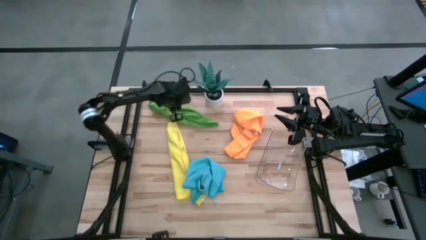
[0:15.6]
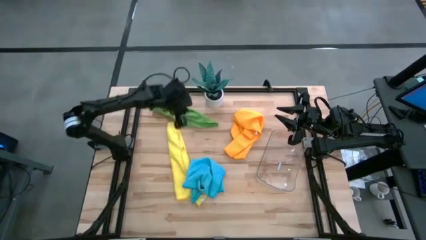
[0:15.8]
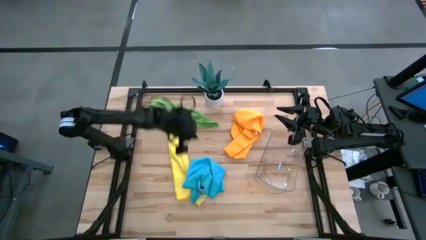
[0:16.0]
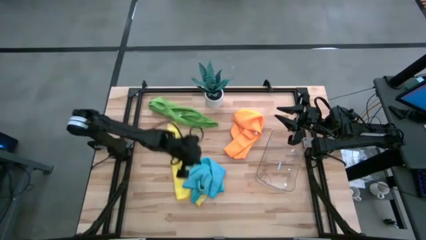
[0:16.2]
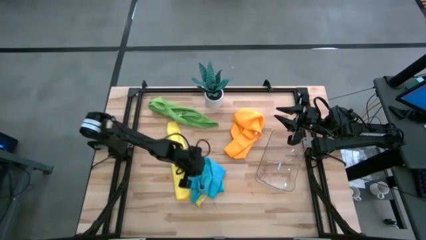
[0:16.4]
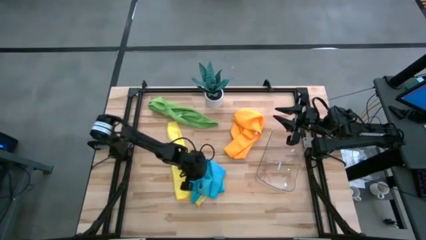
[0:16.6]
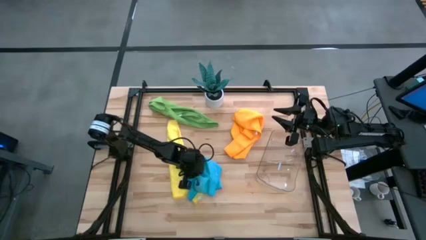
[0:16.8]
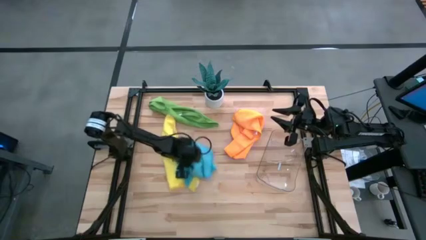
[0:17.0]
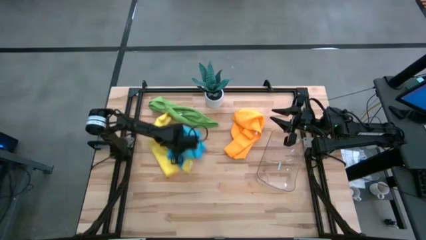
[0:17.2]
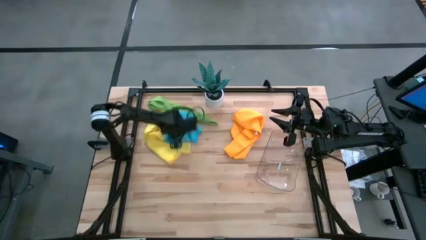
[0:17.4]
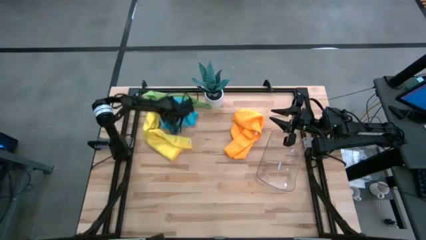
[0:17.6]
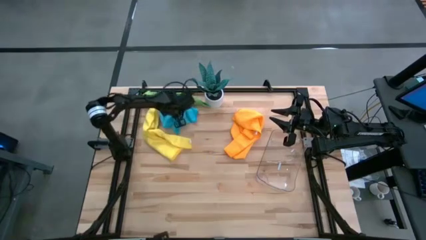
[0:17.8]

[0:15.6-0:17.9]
Task: Roll microfiber towels into tight, uniform cylinder then place into a basket
Move the blue microfiber cloth from center to top left

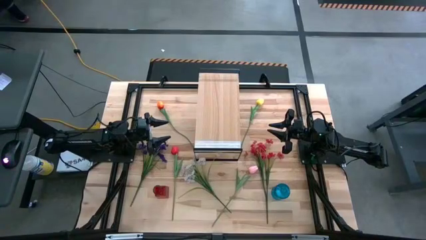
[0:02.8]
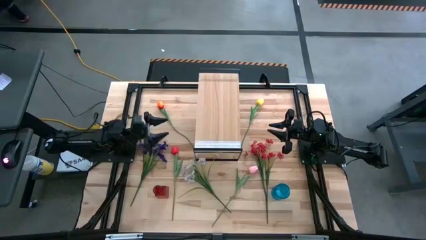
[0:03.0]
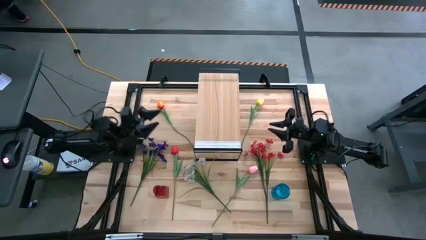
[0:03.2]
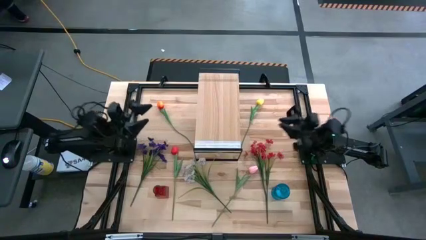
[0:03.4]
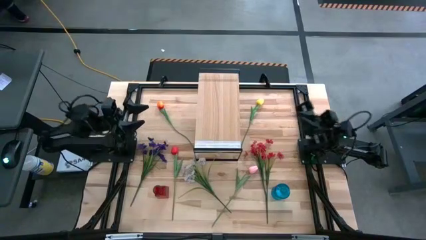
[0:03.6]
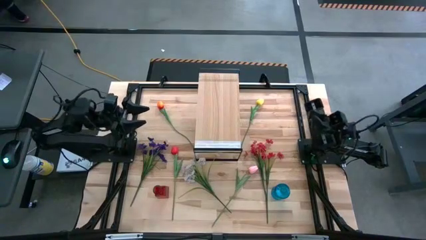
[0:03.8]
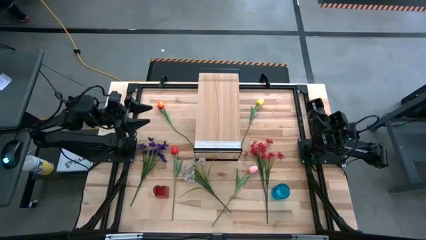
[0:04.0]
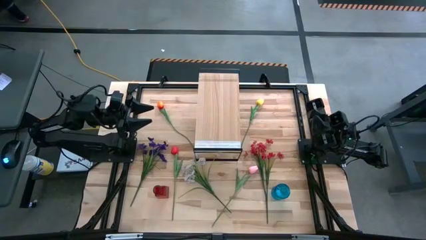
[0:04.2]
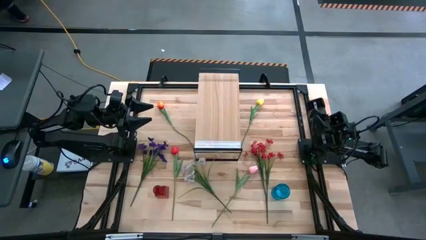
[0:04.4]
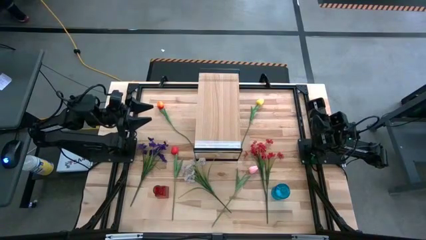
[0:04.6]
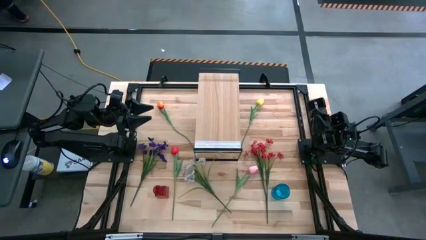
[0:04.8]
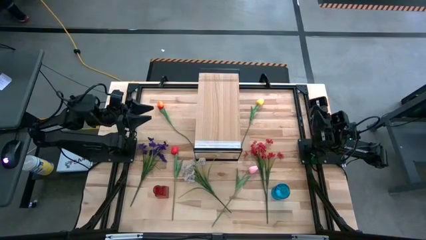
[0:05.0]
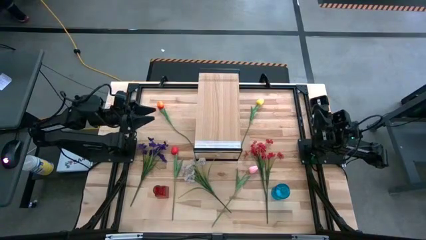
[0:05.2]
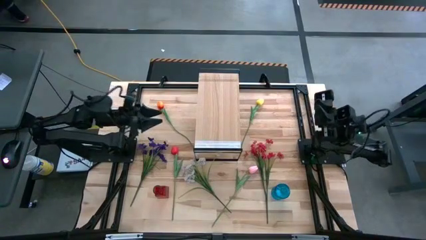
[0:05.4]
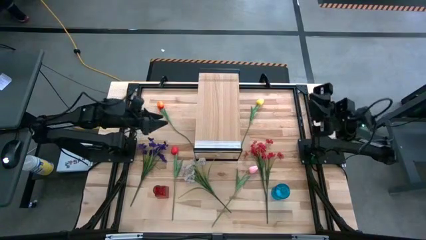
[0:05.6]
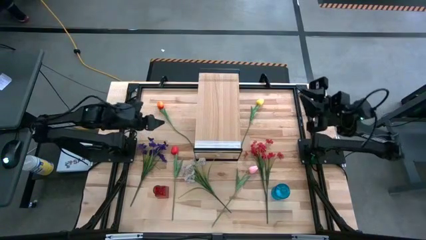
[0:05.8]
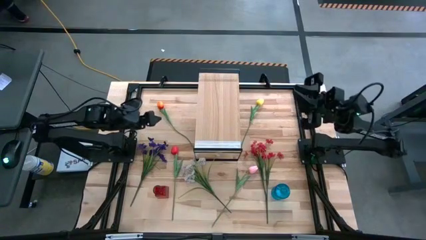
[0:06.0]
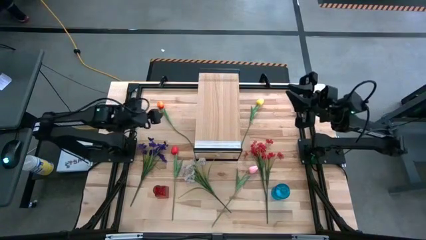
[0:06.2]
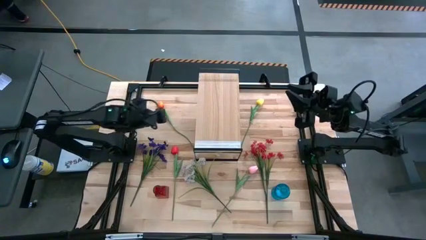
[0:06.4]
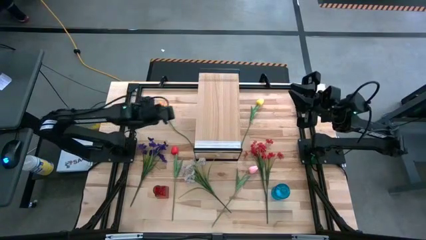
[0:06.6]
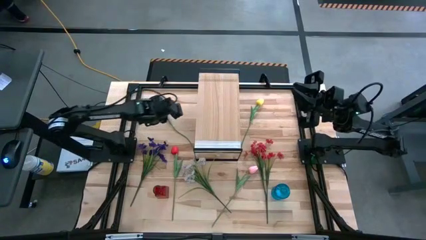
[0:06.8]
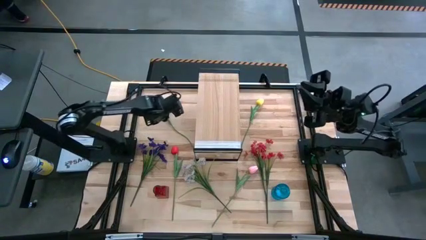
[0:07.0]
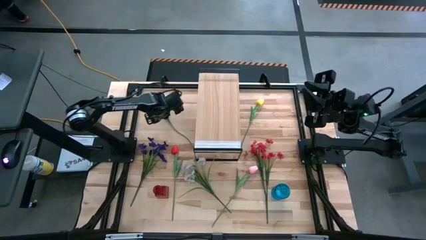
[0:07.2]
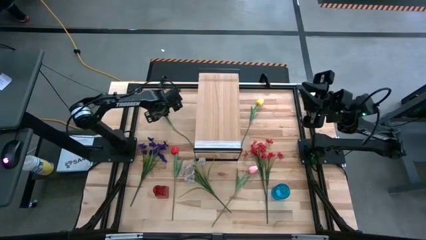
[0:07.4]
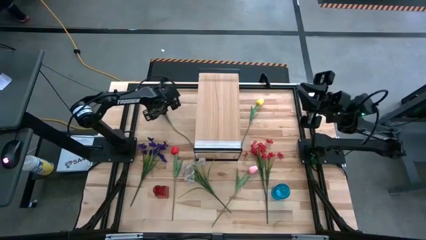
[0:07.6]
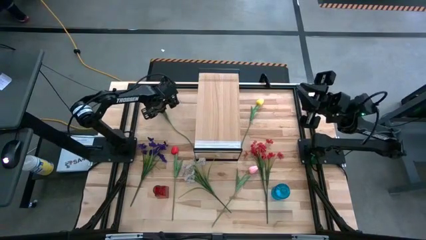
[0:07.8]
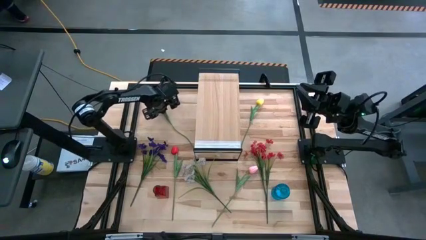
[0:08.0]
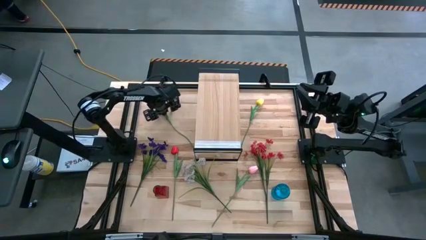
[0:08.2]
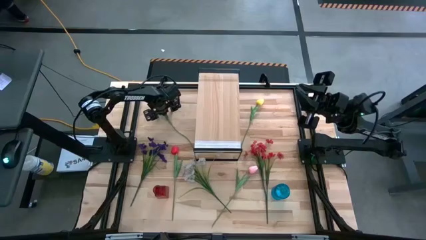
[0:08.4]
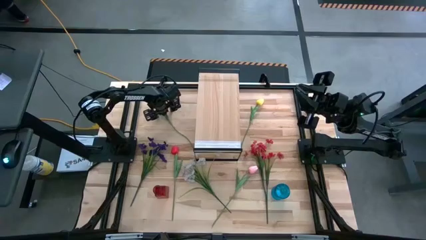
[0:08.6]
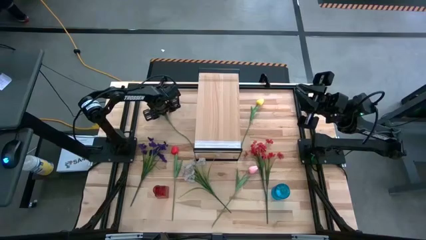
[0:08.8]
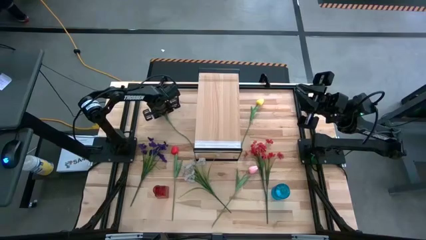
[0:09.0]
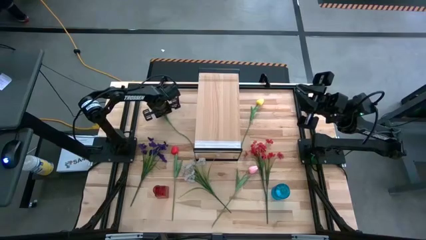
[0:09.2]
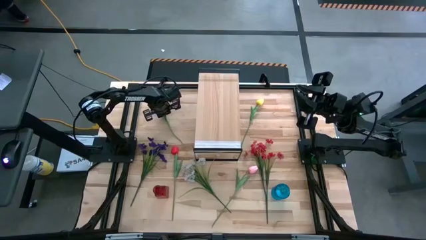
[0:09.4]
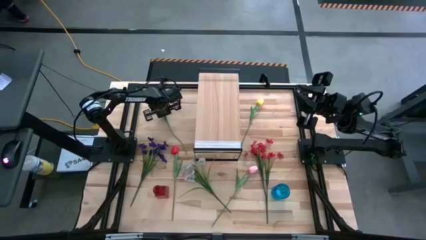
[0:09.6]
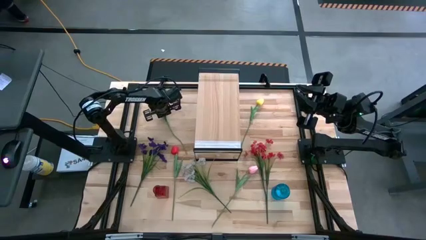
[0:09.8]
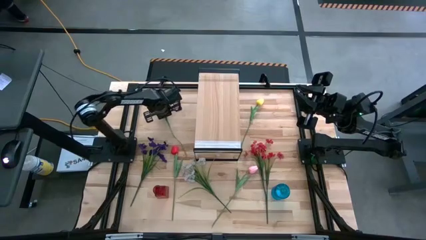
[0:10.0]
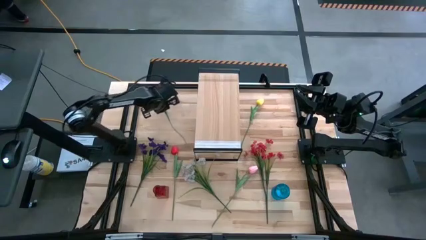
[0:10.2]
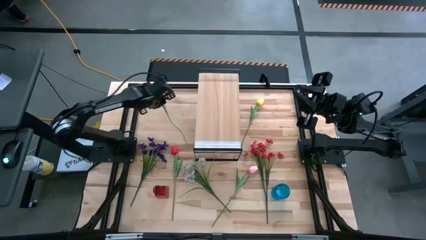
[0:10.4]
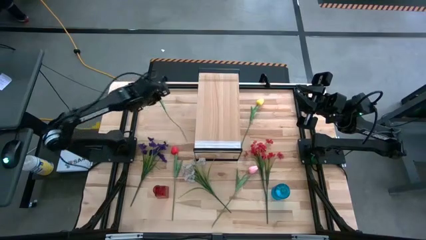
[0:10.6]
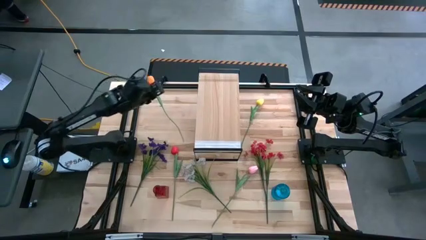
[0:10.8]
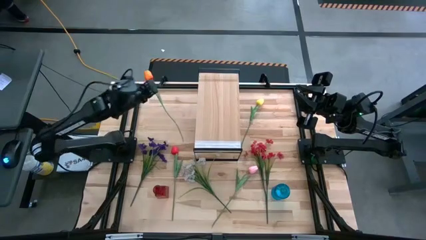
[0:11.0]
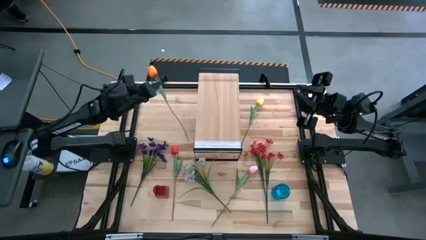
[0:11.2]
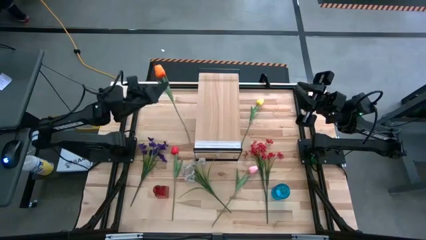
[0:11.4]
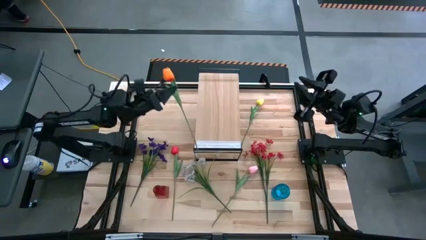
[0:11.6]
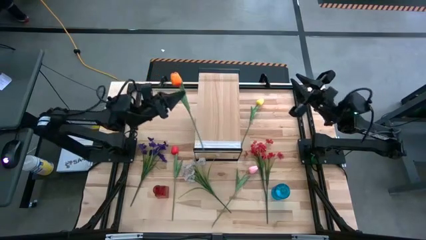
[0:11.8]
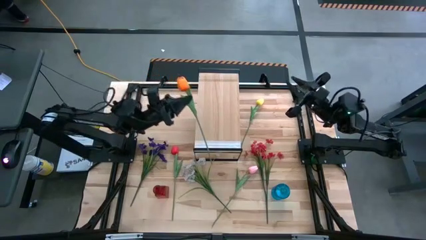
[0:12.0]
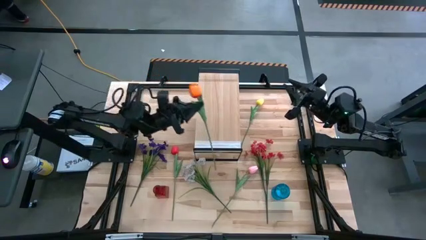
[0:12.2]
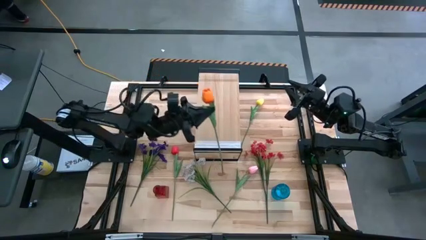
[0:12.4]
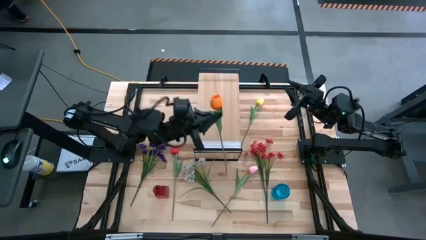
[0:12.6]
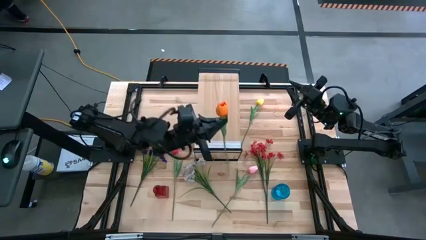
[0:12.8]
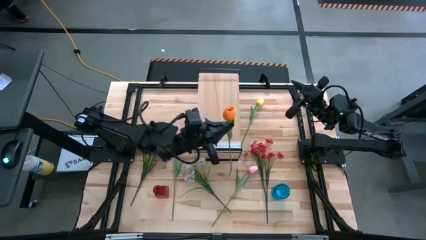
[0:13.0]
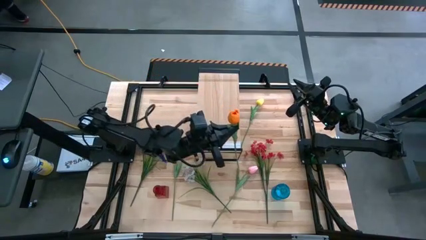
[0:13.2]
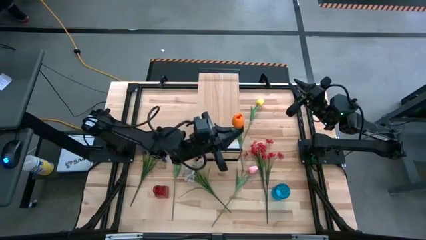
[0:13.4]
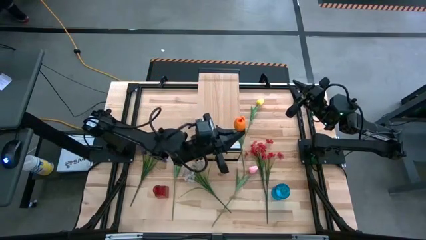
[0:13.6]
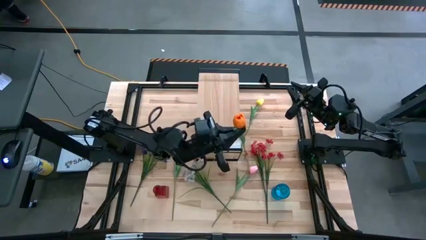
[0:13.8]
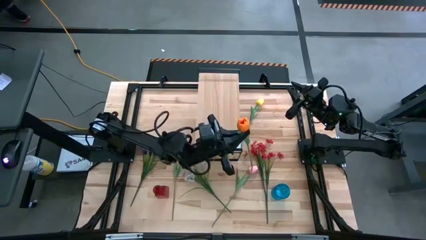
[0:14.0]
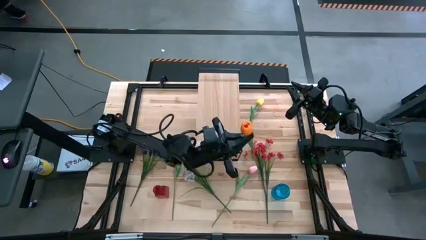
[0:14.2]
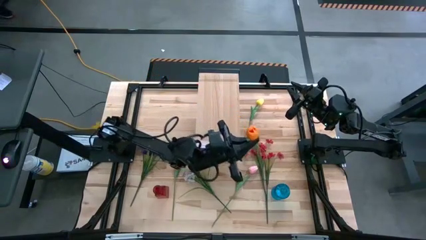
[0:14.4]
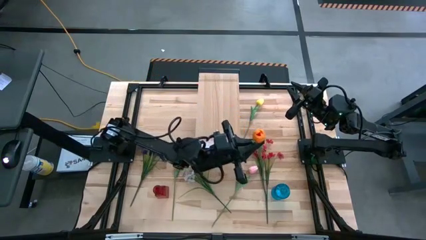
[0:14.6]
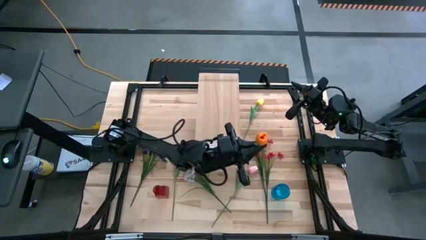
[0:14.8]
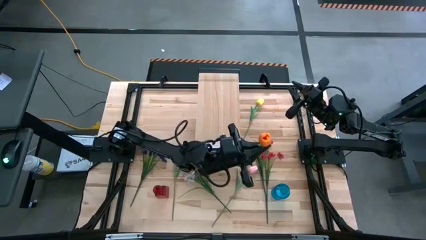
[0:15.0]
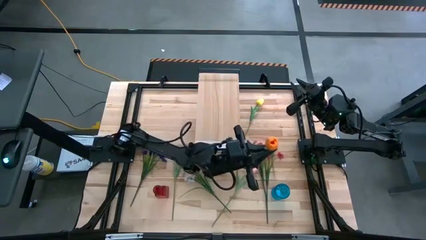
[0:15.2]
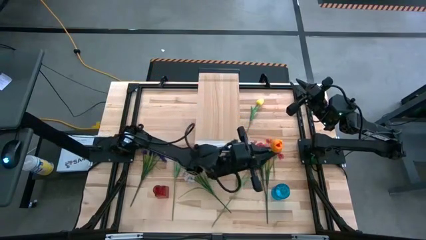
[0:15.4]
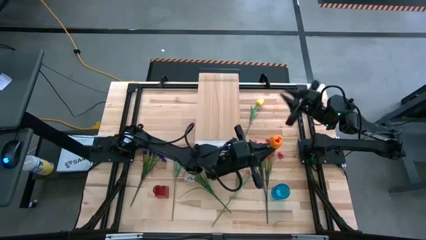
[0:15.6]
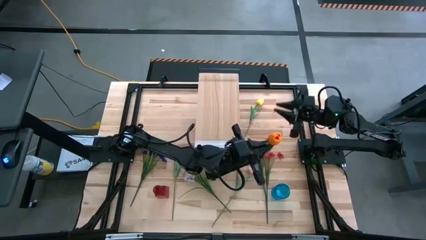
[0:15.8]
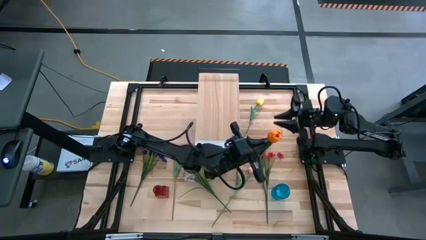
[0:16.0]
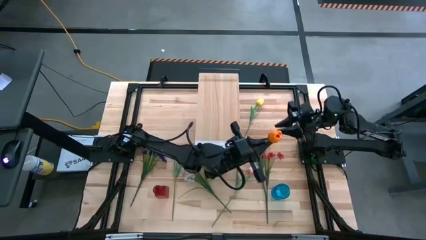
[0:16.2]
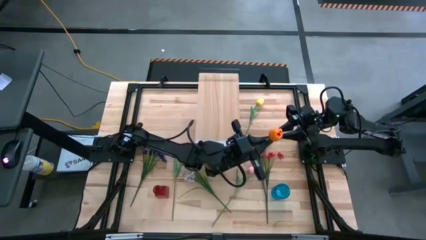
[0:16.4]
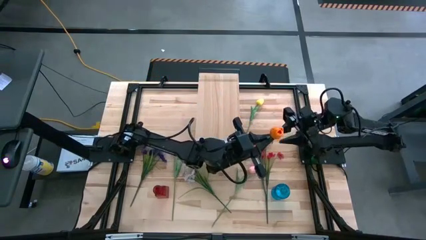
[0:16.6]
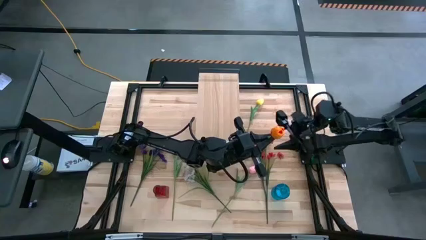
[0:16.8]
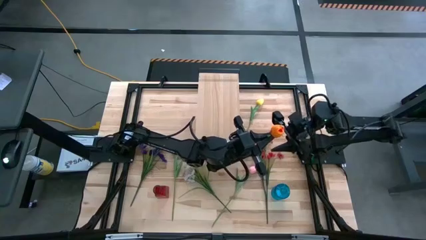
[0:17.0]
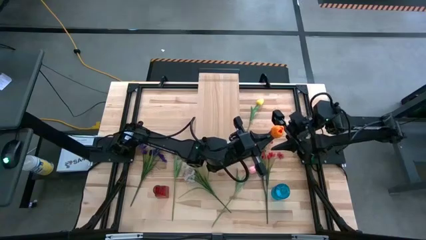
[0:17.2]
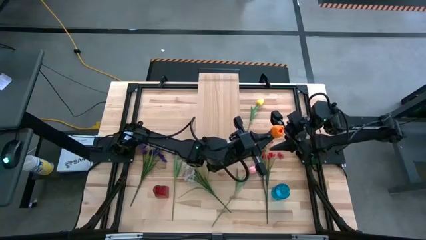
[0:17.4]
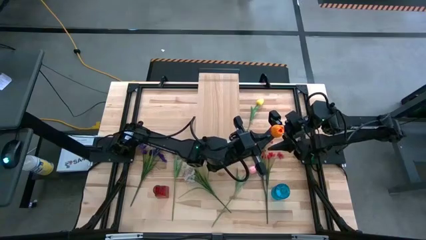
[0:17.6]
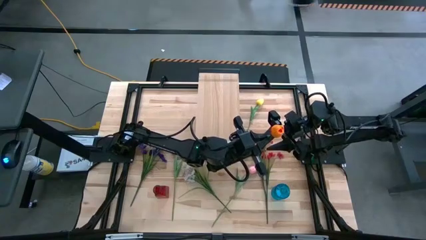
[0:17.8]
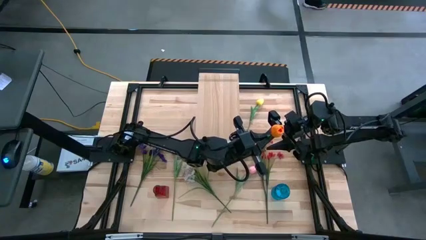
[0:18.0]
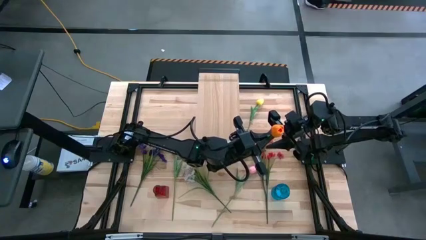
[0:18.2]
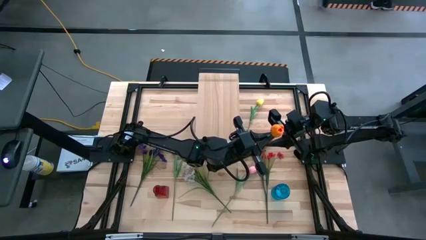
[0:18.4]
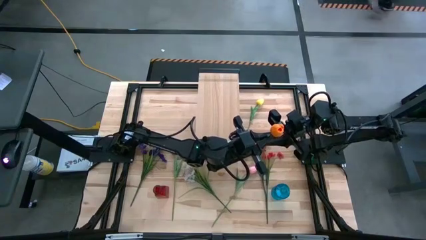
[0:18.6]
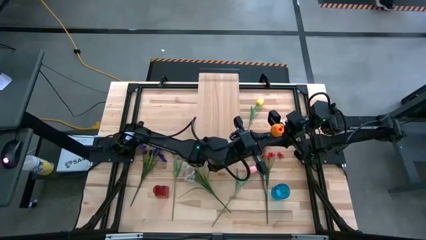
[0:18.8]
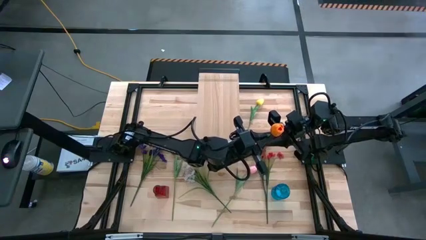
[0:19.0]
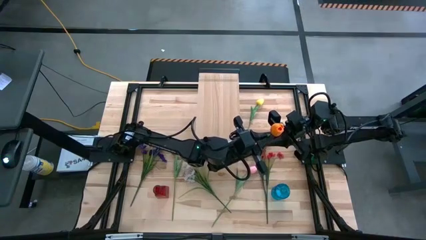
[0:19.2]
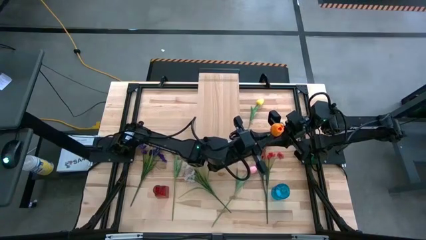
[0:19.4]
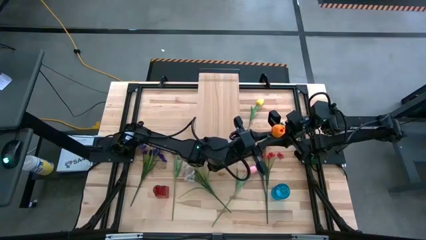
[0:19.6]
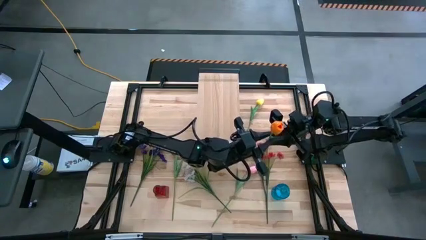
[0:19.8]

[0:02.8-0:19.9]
Task: Pick and place flowers into a vace then onto a shelf
Put the orange tulip into the blue vase
